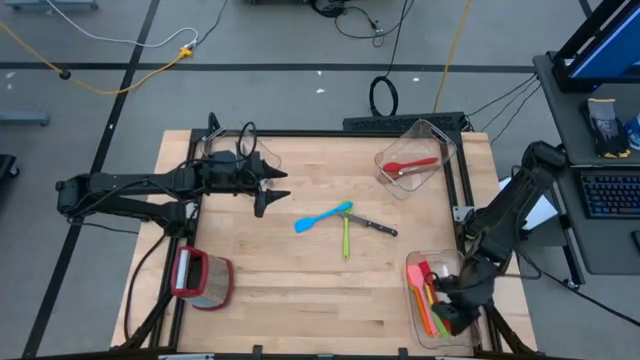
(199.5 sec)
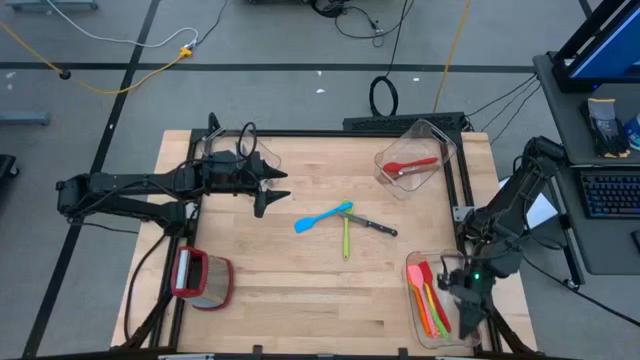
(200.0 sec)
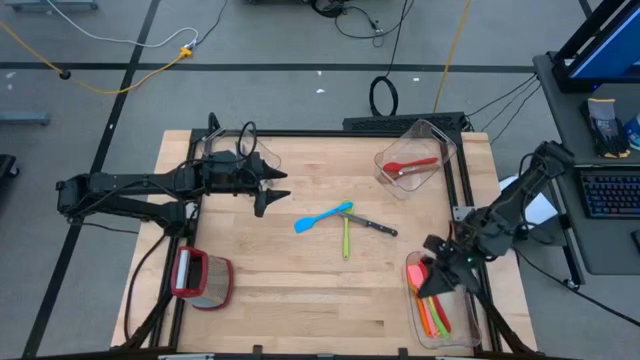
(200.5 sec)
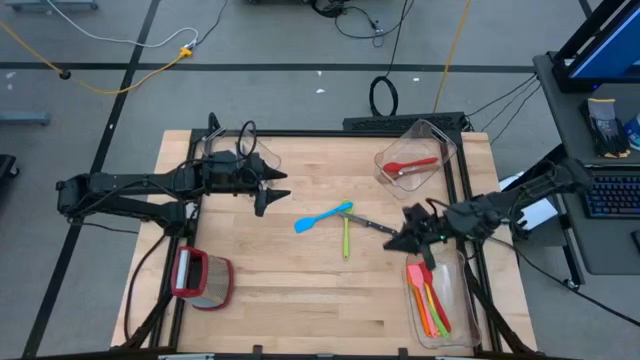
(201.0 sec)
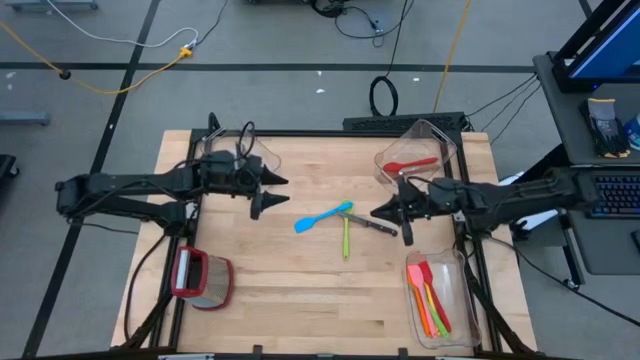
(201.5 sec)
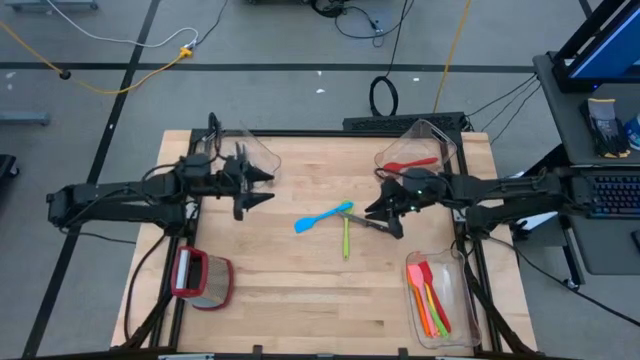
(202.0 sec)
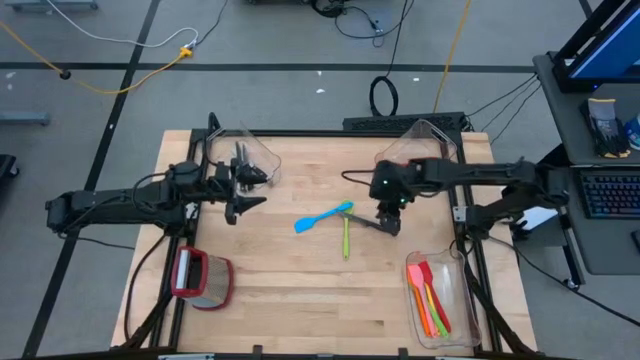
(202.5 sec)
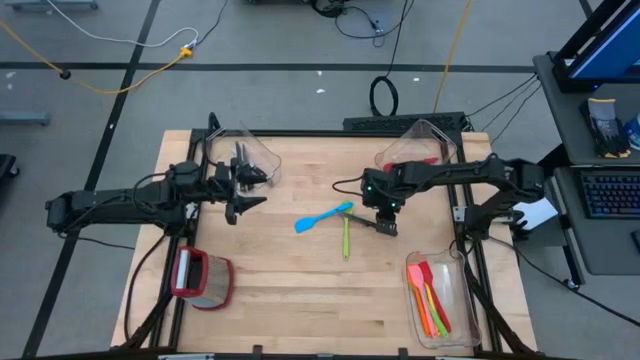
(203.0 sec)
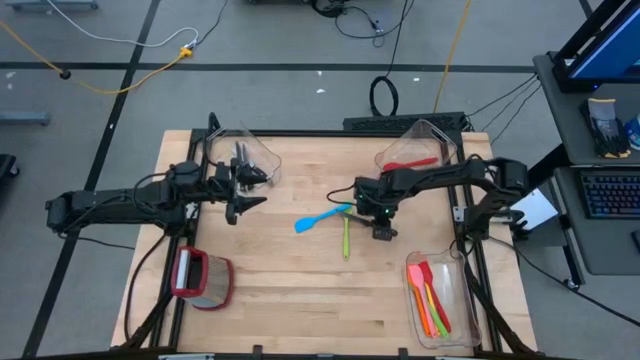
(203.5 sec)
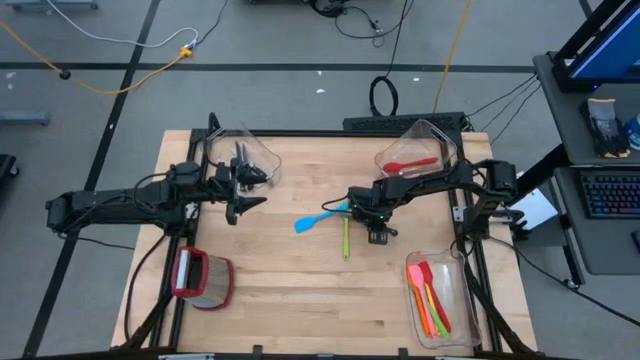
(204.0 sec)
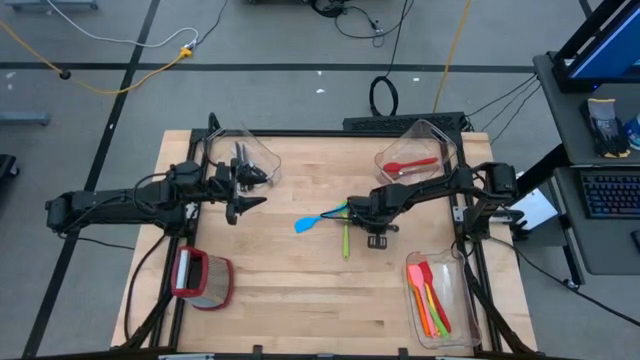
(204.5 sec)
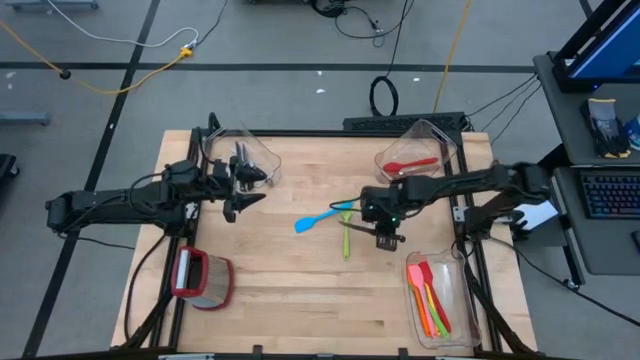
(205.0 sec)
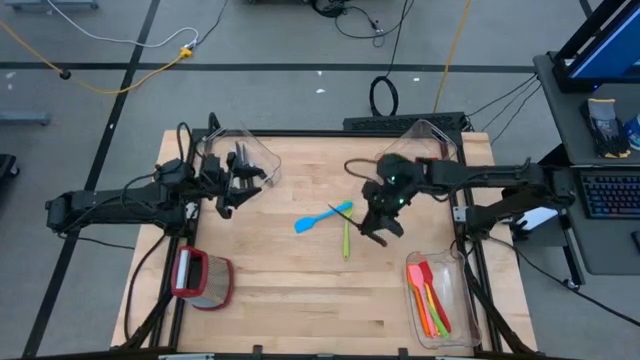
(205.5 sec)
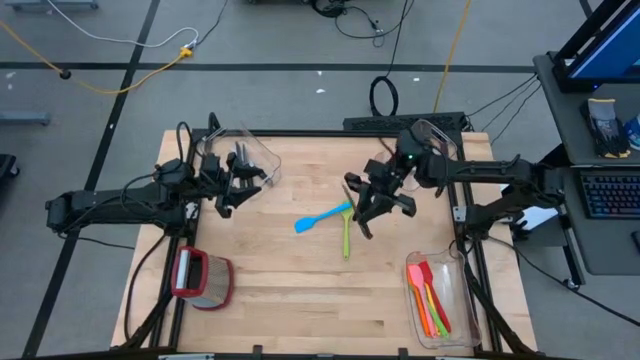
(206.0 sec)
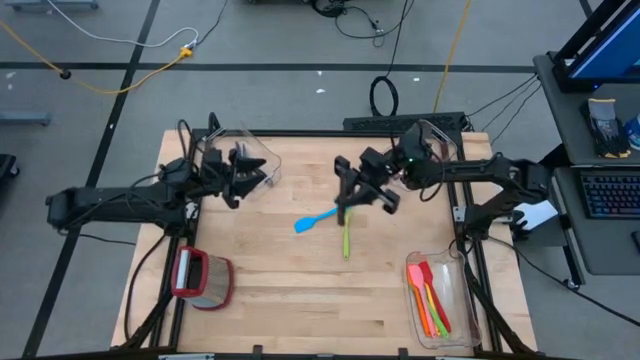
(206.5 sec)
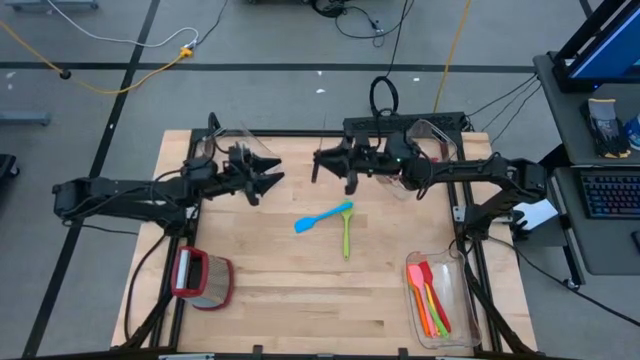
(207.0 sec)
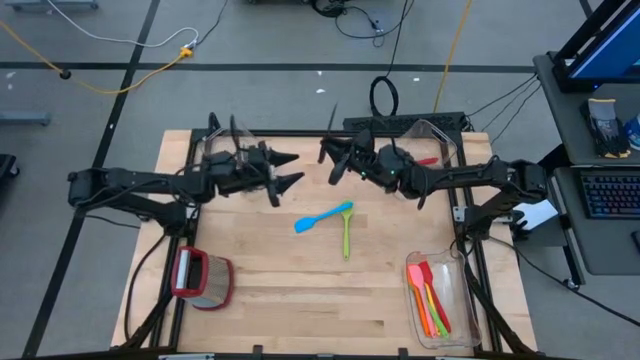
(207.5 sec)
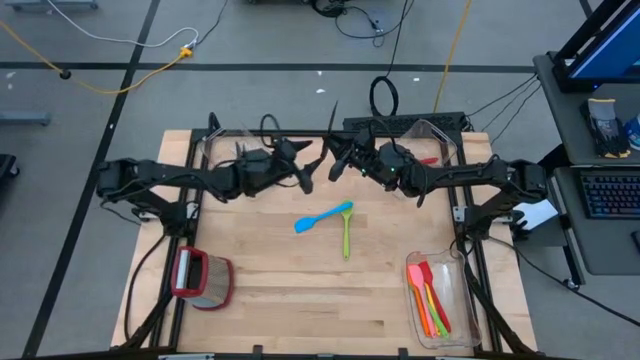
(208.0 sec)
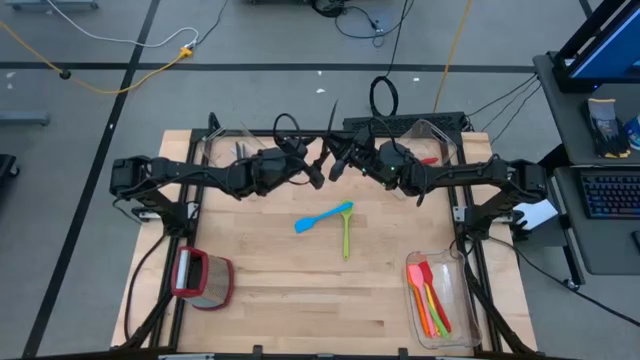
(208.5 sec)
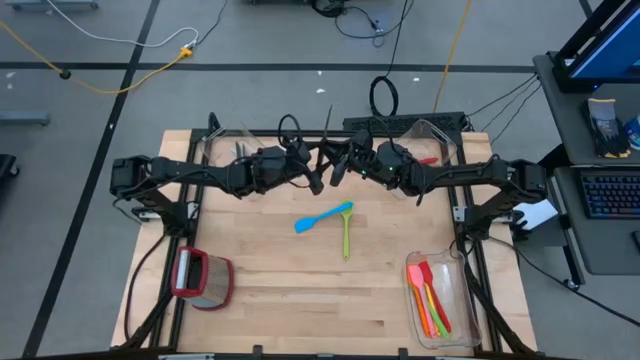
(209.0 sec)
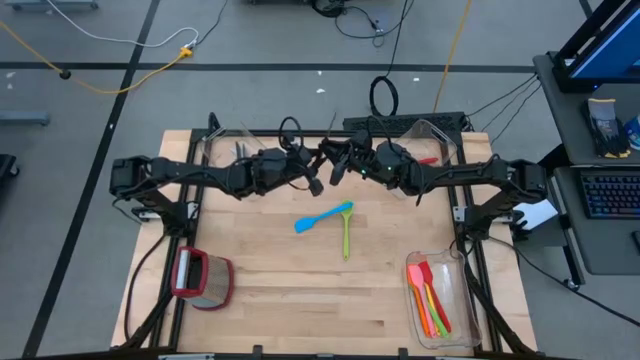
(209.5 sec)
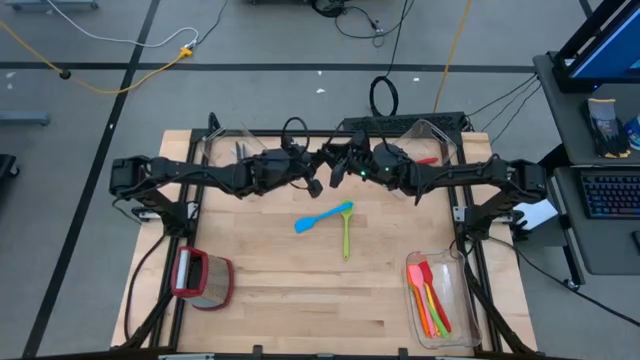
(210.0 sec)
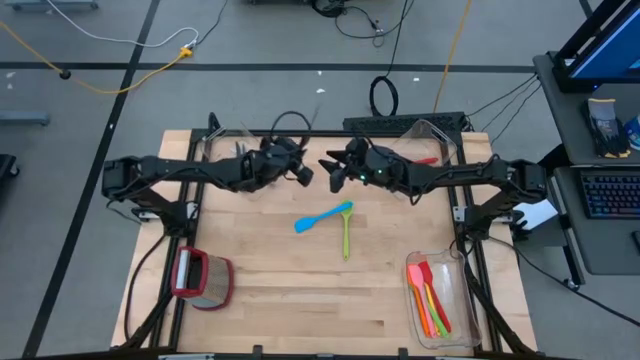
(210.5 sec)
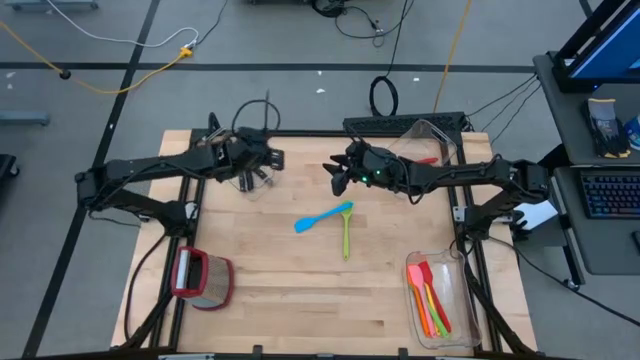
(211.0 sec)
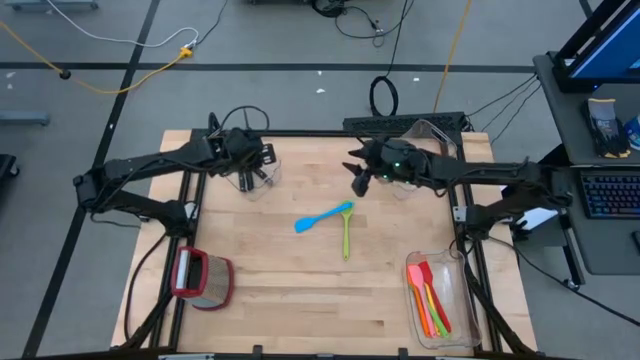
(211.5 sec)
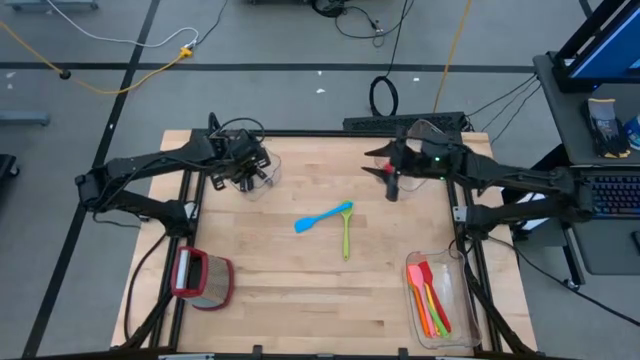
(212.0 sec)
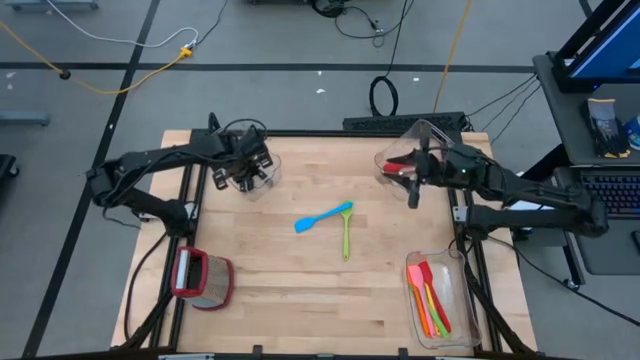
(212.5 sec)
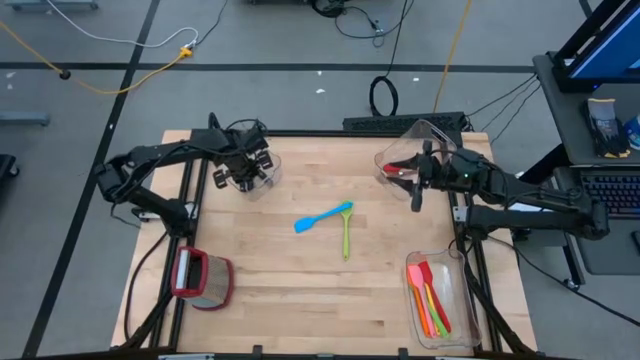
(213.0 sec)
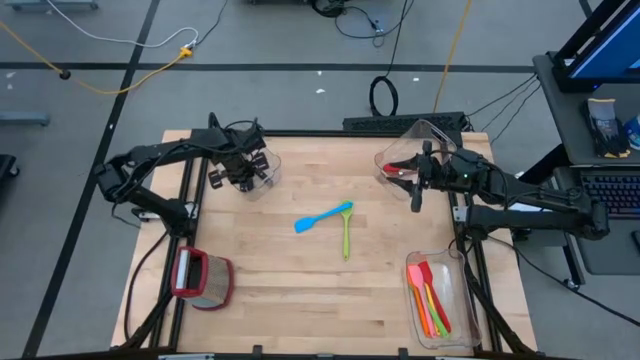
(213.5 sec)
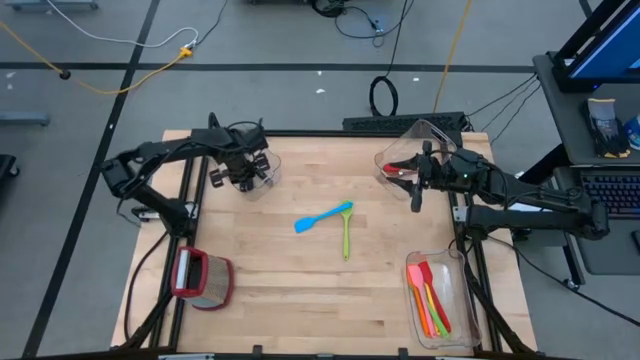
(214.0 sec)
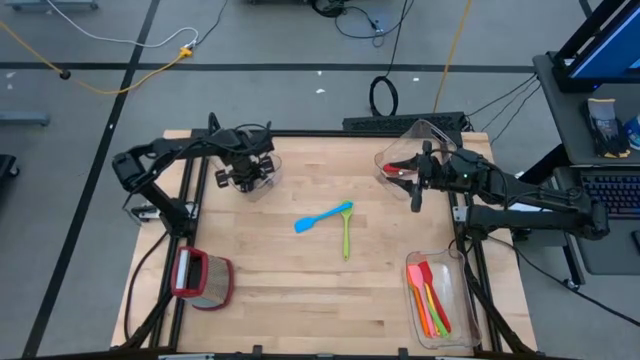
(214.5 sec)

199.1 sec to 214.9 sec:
Task: Pick & Place Kitchen Items
Put the black kitchen knife into the top left transparent bin

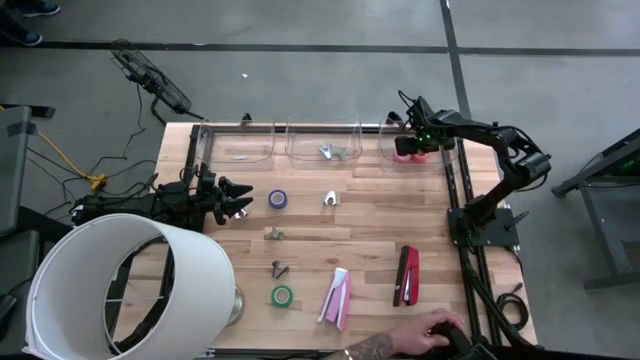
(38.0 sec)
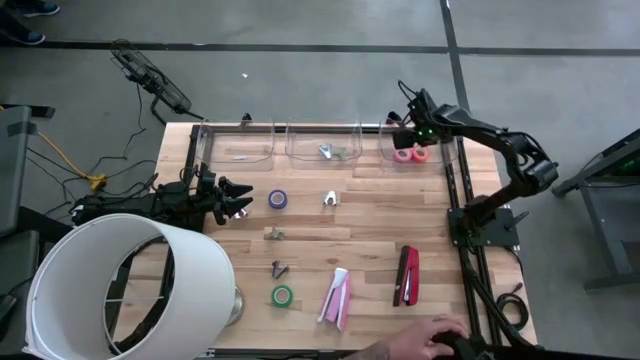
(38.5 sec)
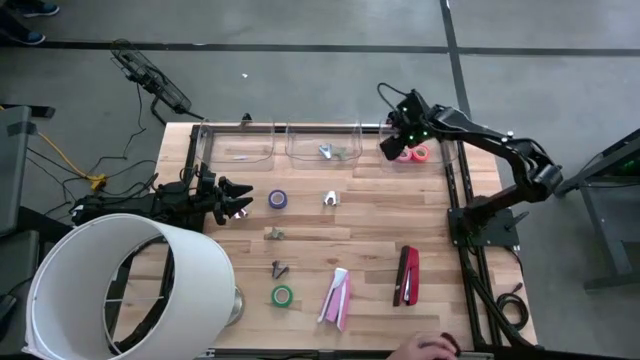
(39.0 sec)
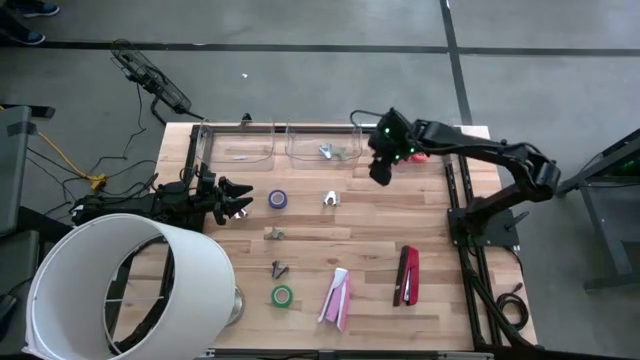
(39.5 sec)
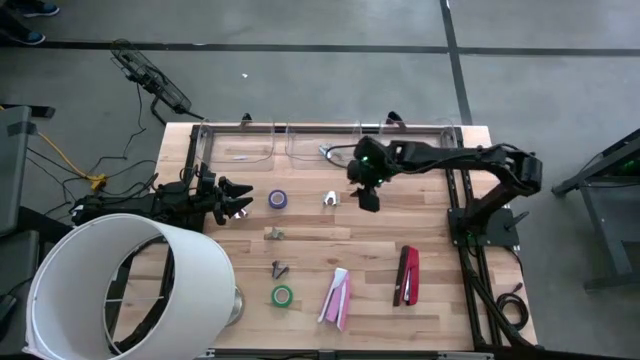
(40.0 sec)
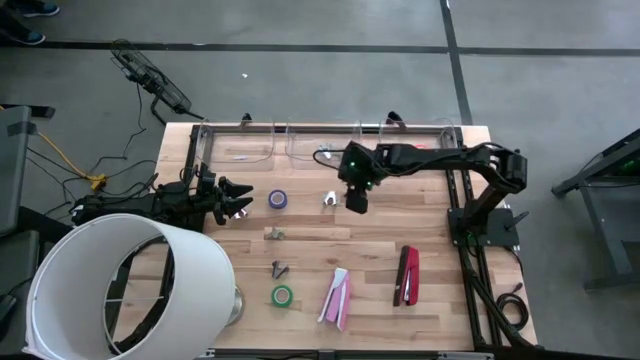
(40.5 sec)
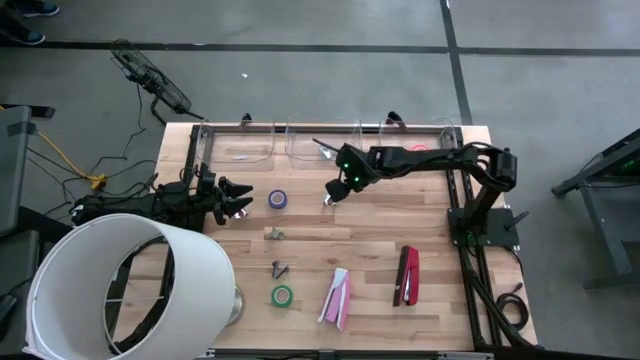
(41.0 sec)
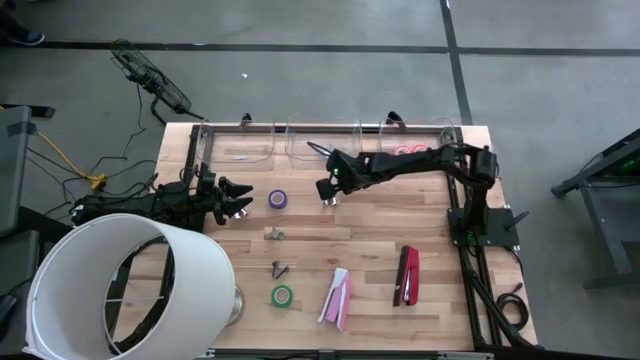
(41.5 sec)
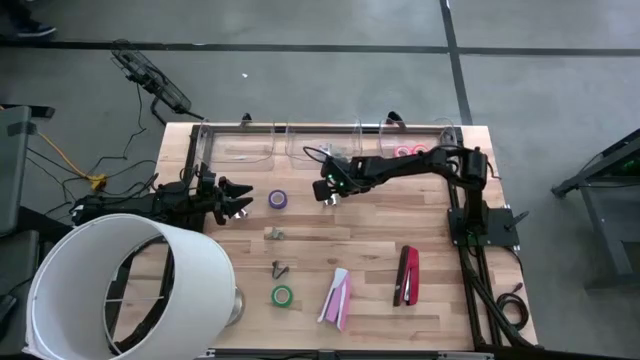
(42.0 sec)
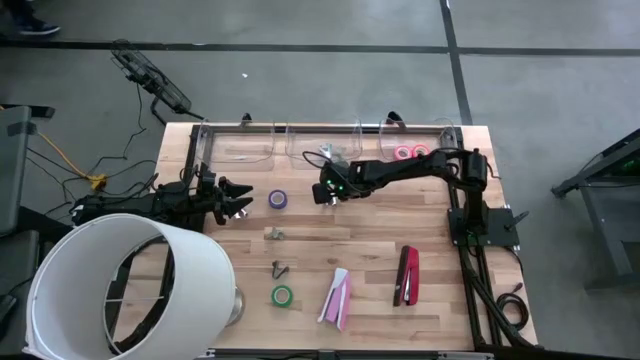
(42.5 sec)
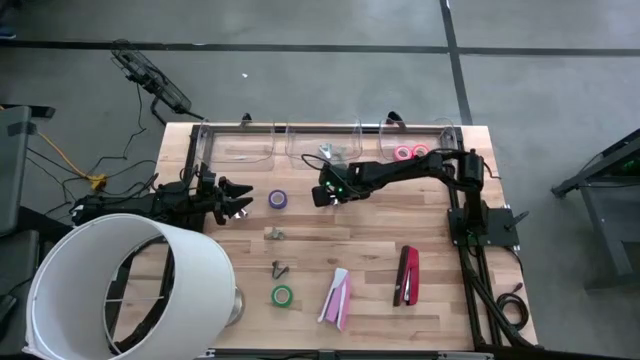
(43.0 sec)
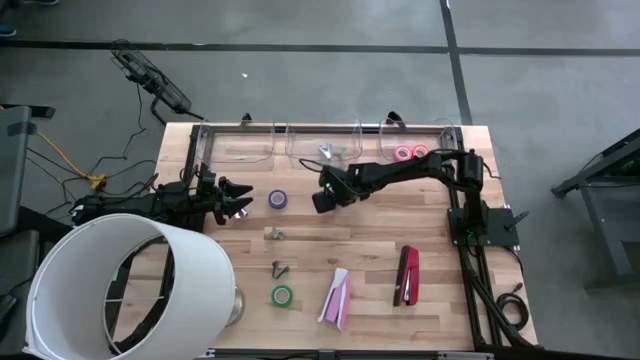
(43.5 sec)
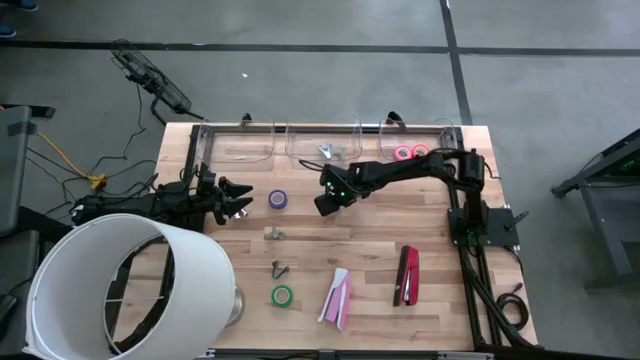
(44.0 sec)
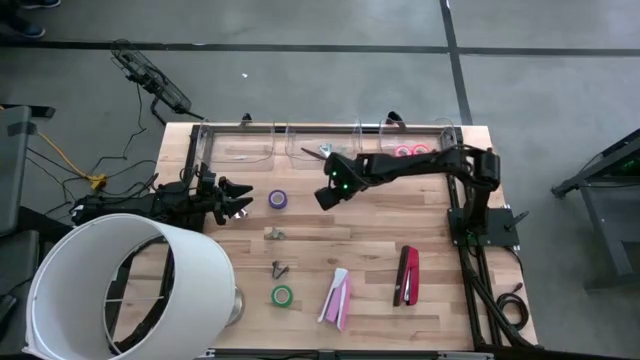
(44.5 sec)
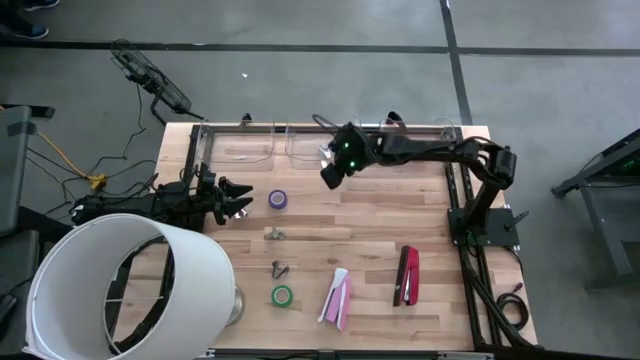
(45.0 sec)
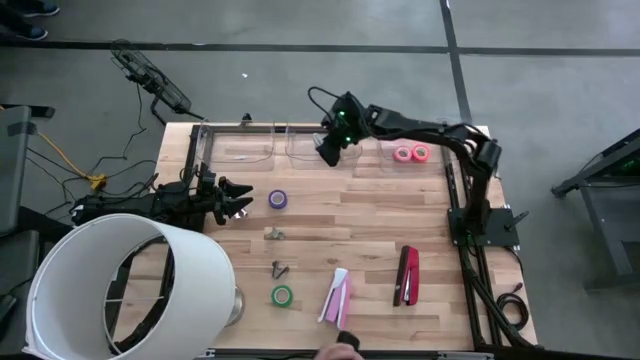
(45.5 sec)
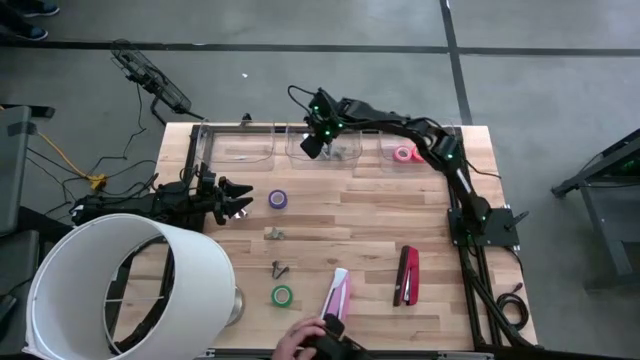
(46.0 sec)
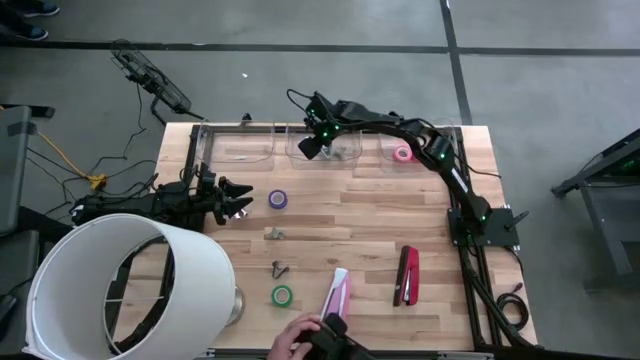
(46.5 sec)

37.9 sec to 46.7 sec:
Task: Pick and place Stapler, Stapler remover, tape
Put the blue stapler remover into the middle transparent bin
